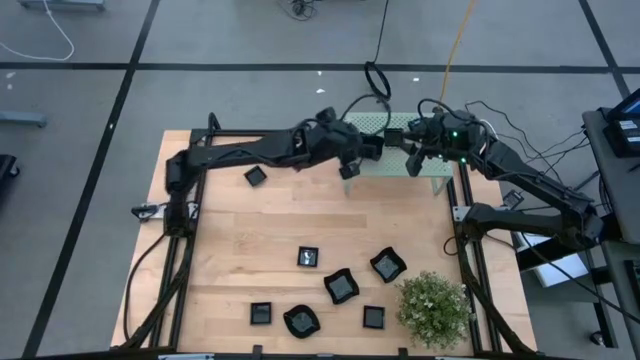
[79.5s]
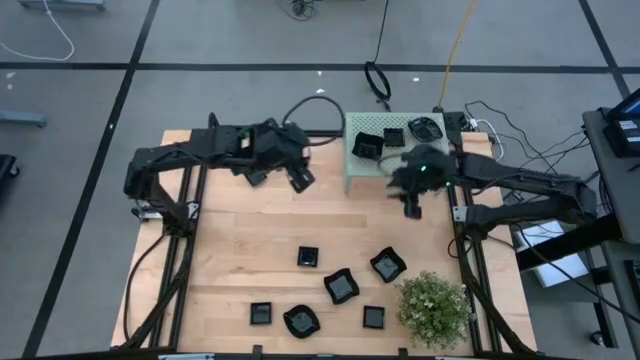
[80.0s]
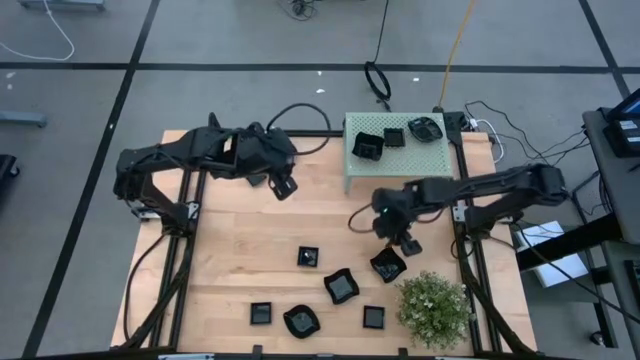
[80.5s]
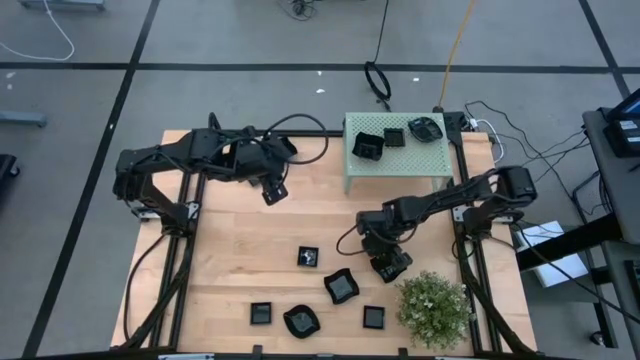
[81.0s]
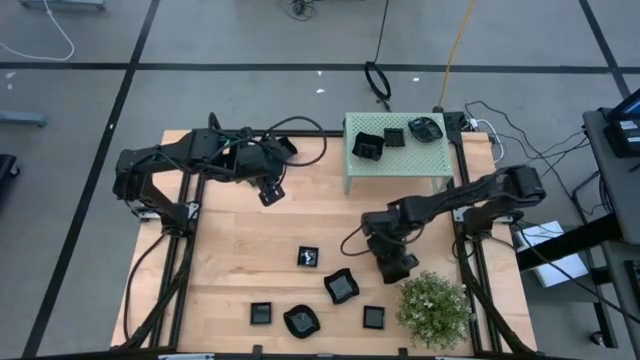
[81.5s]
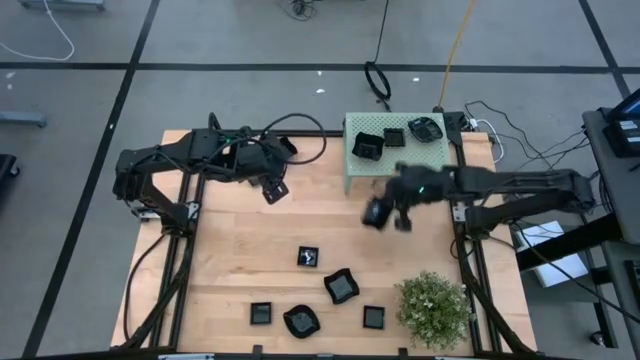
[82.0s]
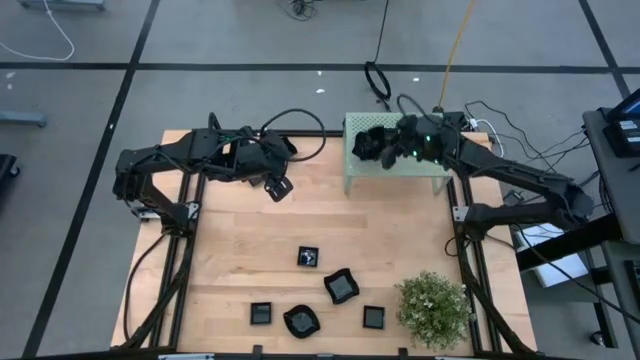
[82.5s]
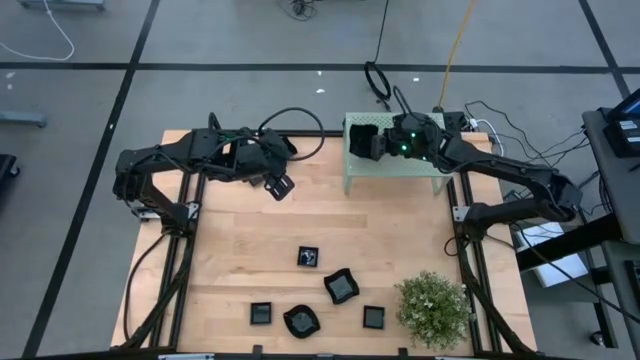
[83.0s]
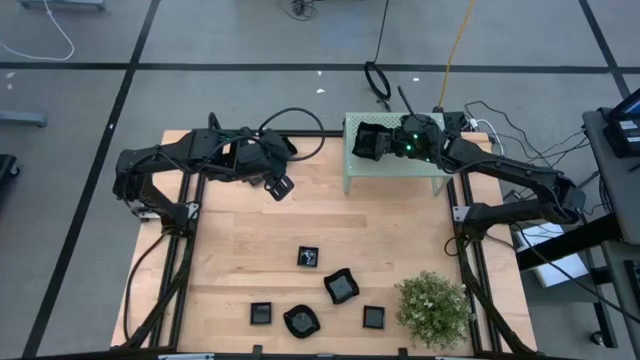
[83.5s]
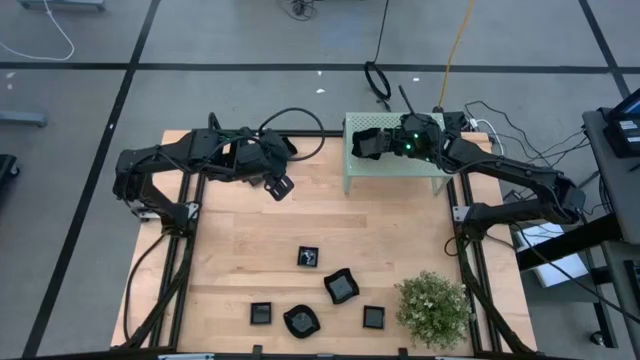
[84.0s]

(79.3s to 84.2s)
Task: Pick & Place Mini shaped plates
Stack the black distorted square plate on top of the distorted square plate on the shelf

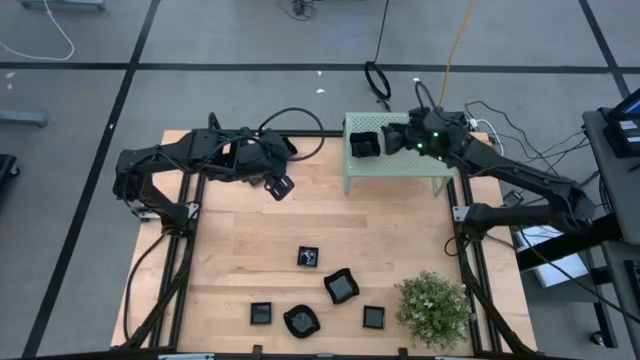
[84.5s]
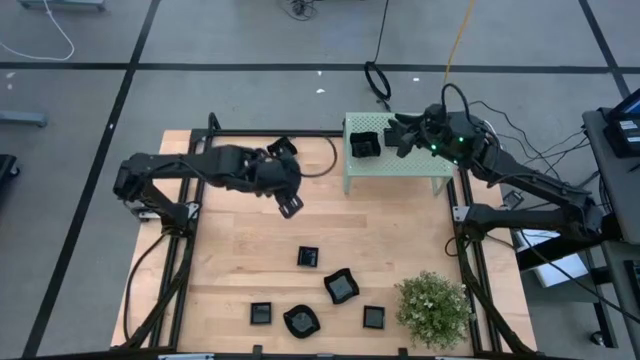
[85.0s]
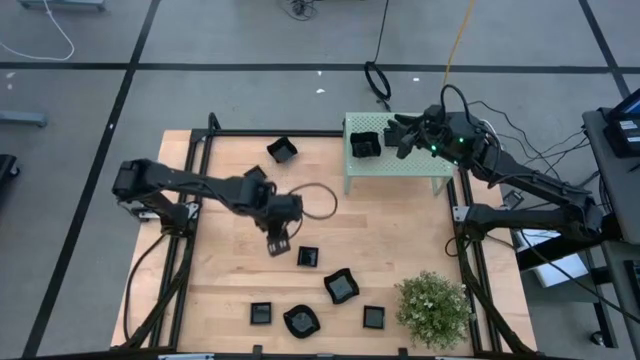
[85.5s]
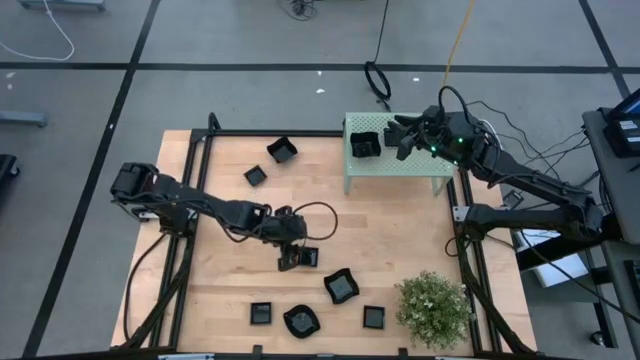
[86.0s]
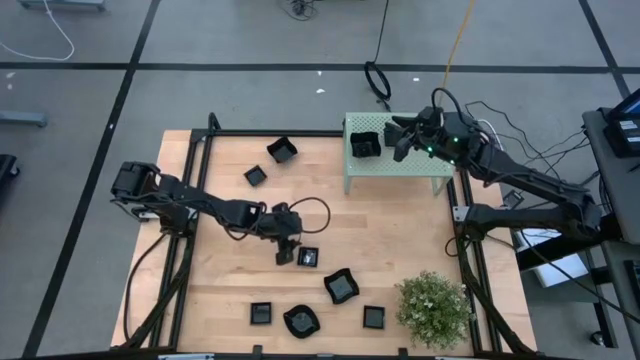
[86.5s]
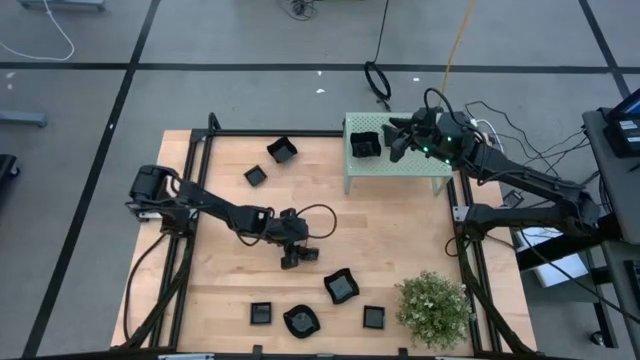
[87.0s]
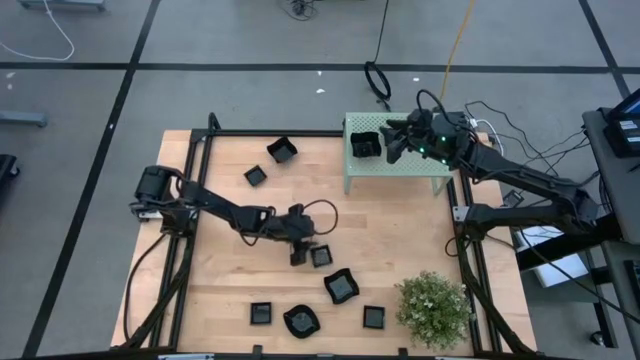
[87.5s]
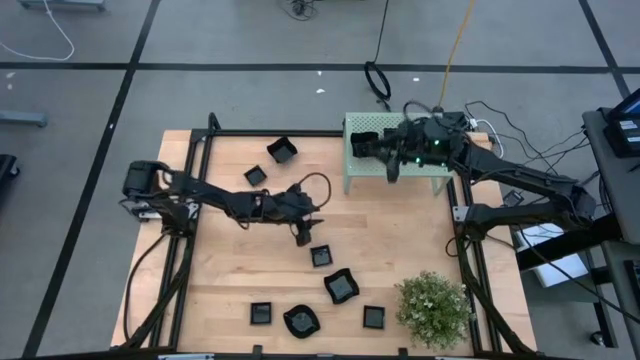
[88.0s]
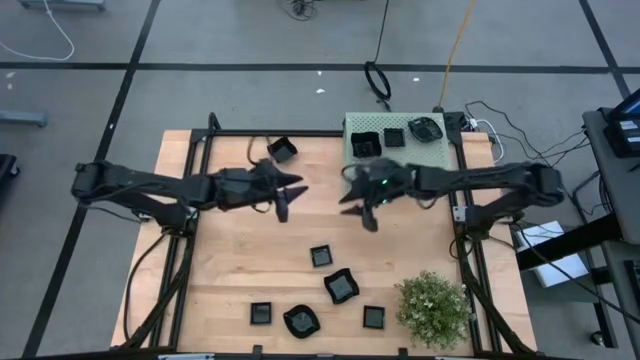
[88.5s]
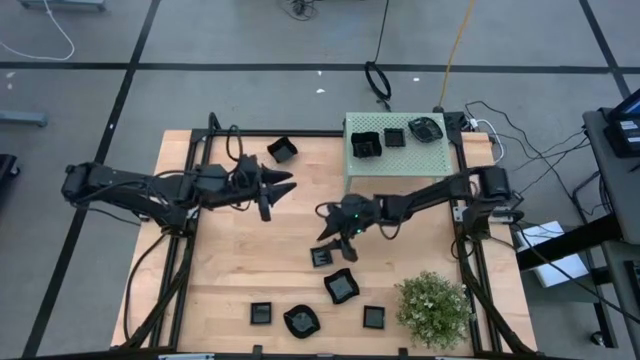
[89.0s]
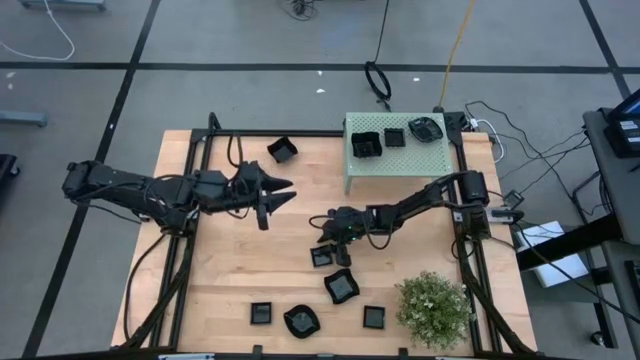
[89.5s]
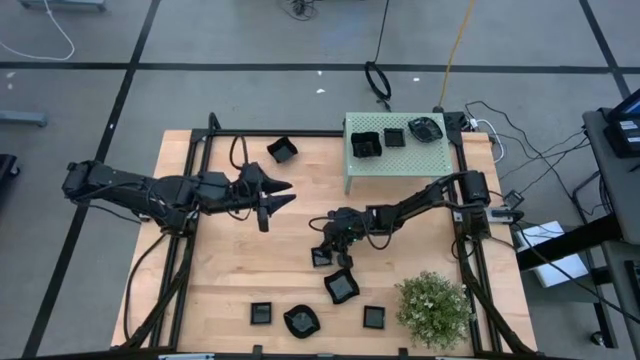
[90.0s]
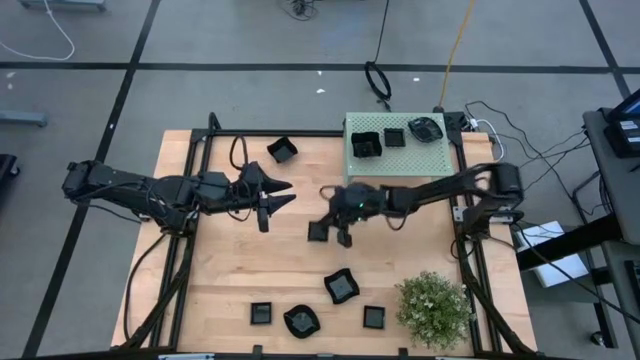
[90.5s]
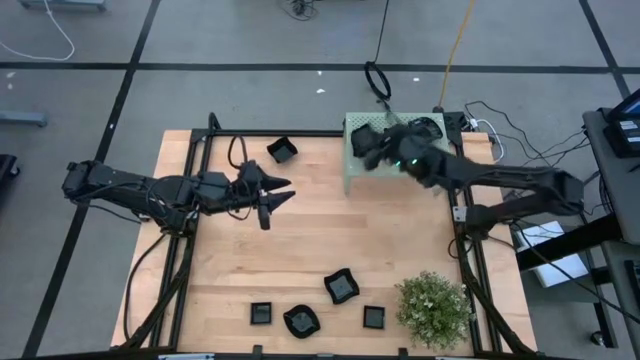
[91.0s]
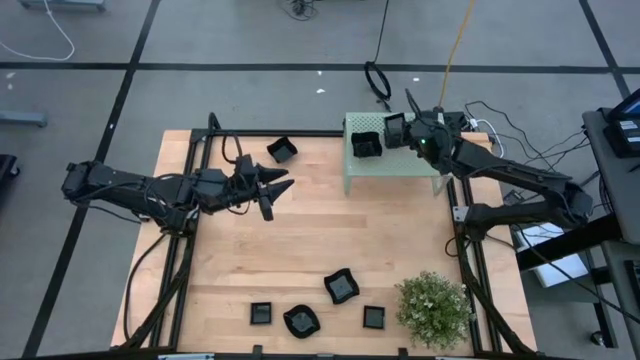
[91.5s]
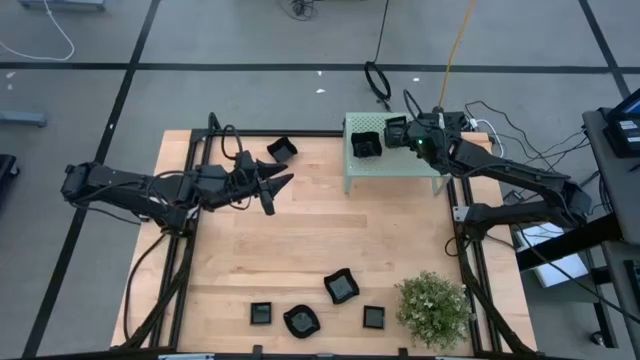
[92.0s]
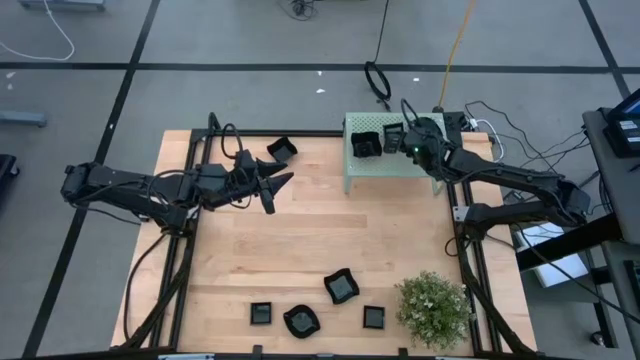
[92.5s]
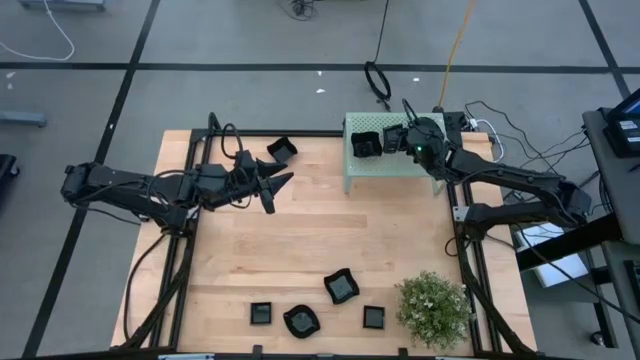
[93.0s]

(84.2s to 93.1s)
Stack the black square plate on top of the square plate on the shelf

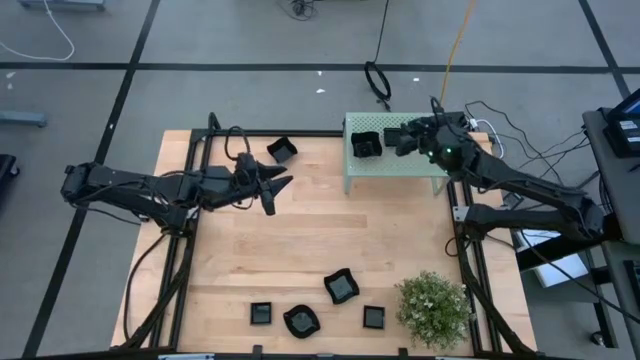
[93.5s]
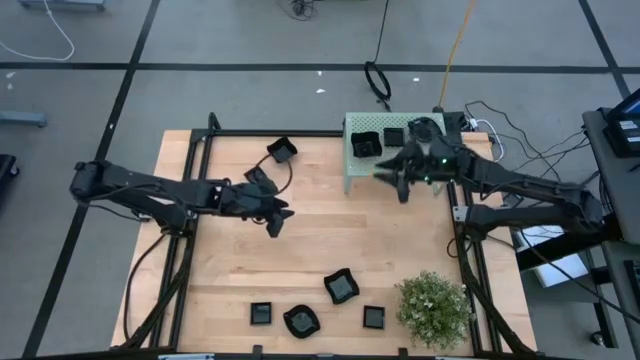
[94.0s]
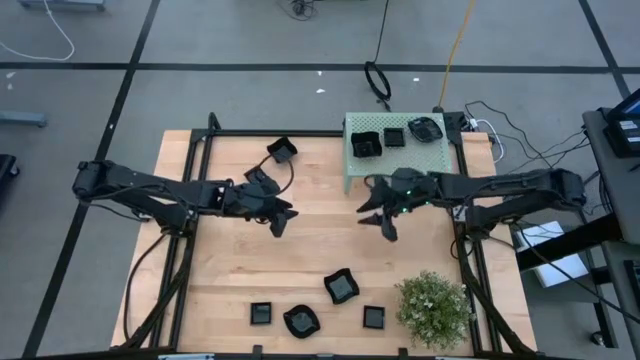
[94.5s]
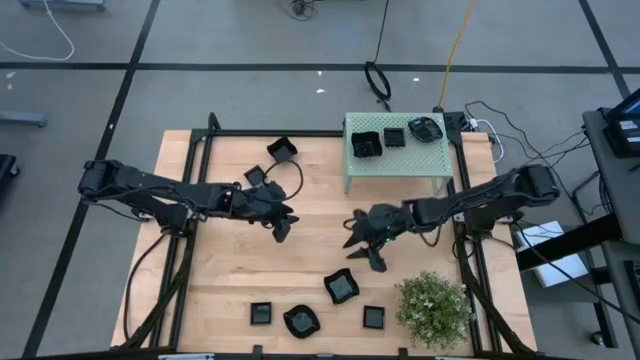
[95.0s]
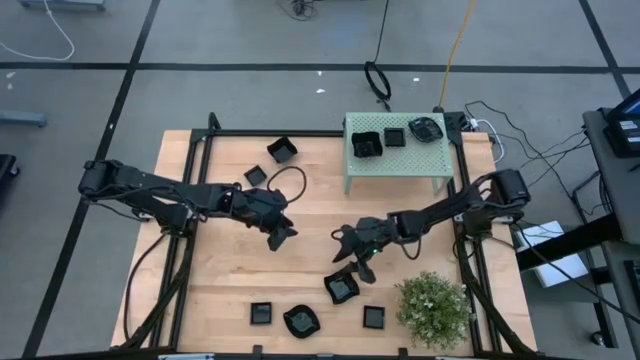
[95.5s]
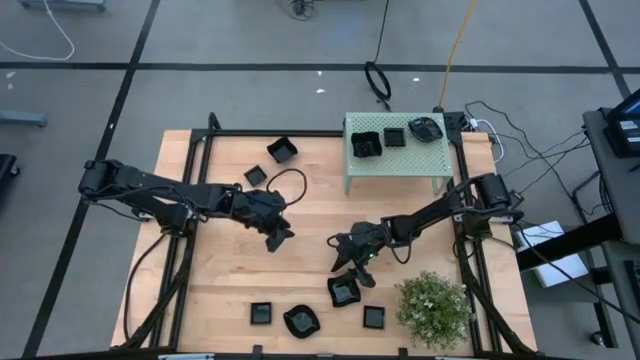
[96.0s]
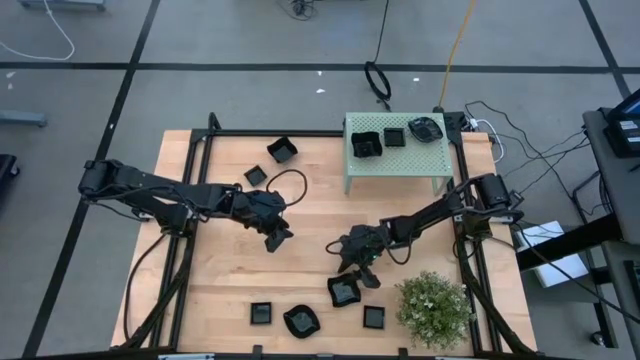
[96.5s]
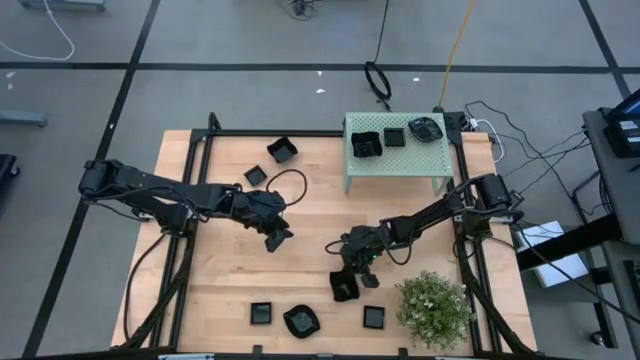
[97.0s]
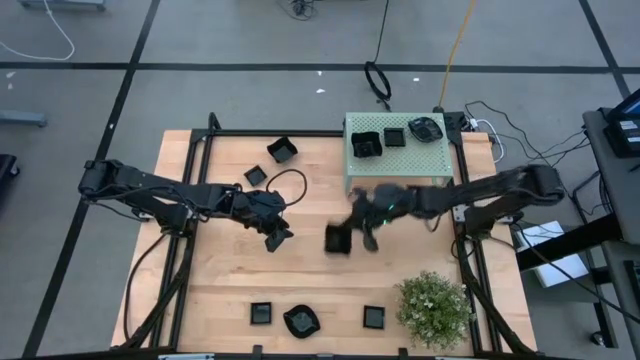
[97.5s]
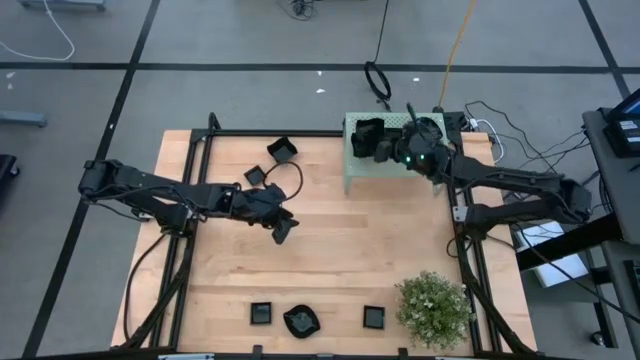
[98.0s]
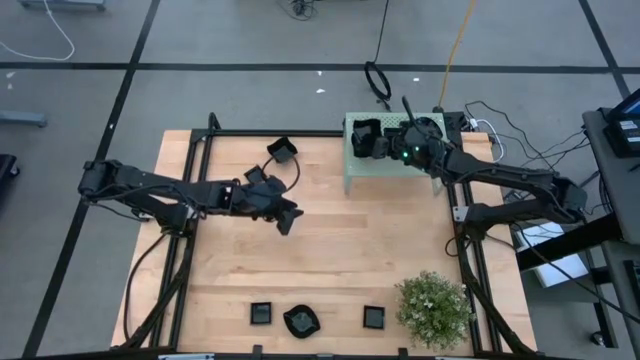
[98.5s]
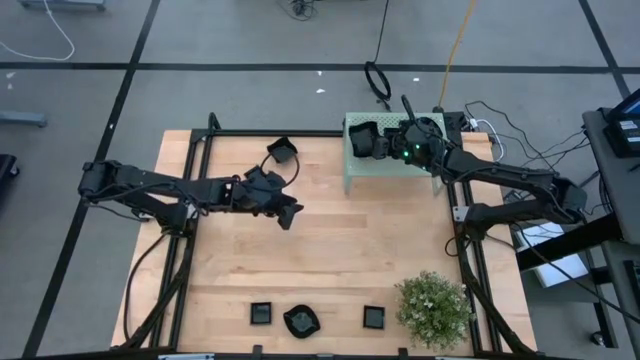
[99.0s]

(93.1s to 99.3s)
Stack the black distorted square plate on top of the distorted square plate on the shelf

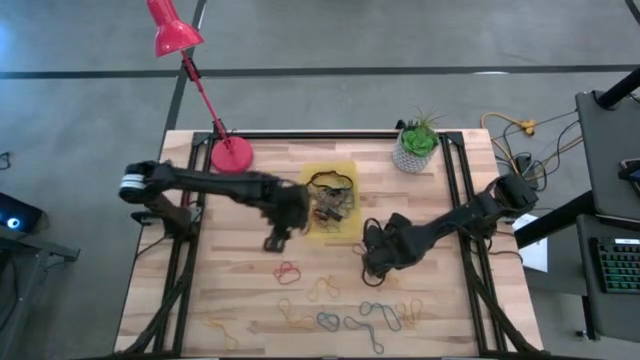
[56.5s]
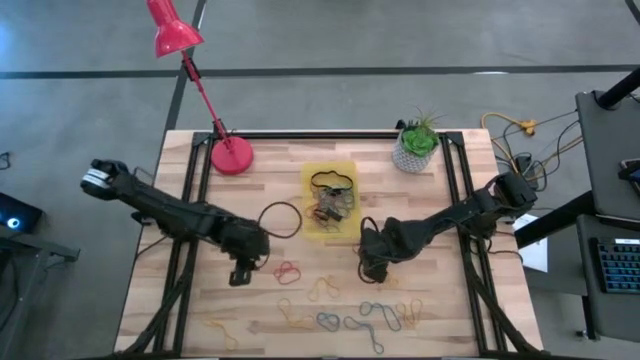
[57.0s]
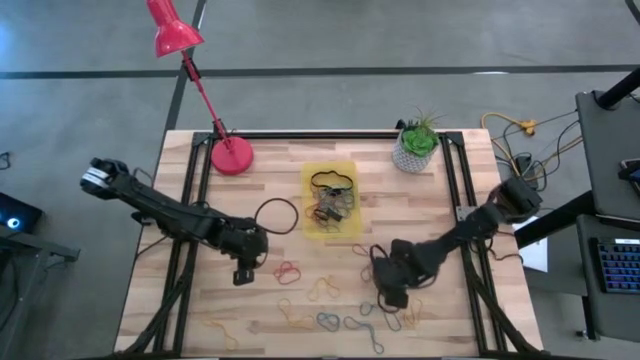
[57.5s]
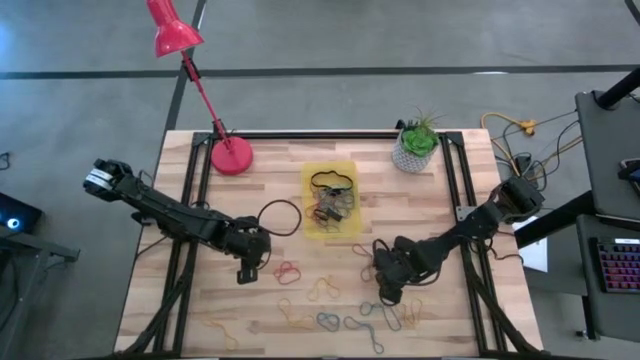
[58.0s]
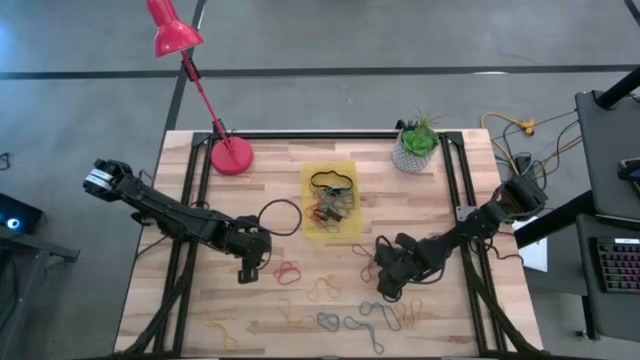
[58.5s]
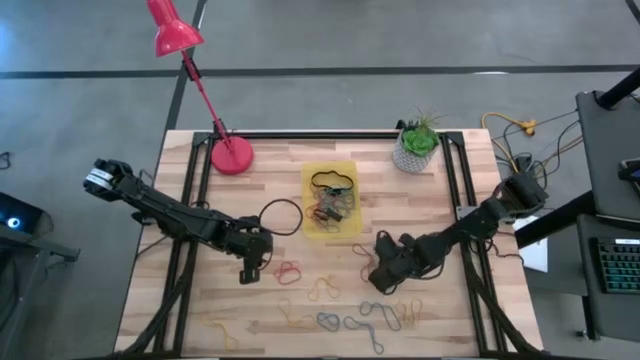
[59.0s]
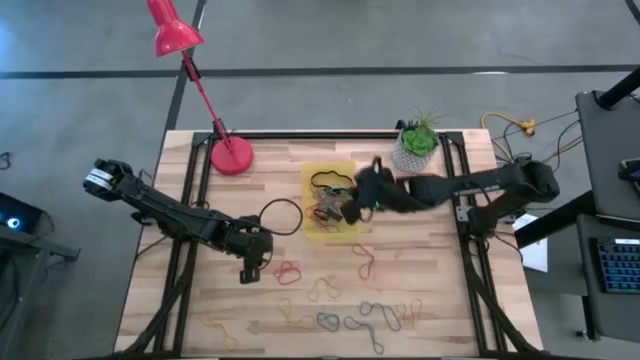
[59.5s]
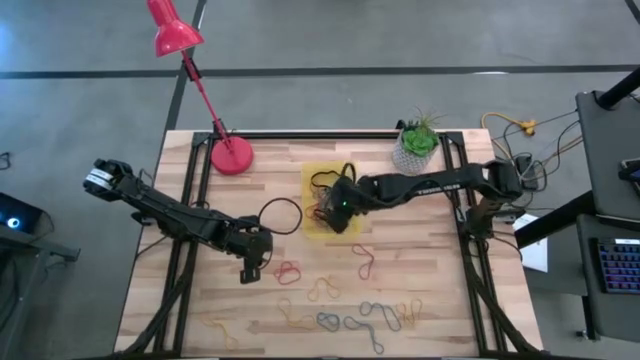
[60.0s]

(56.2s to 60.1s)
Task: Pick and place rubber bands into bin
Put the yellow rubber band into the yellow bin
